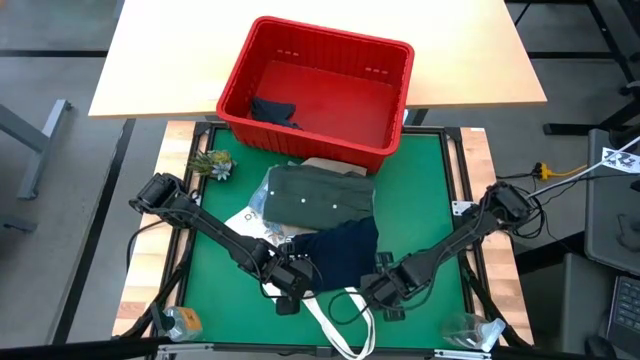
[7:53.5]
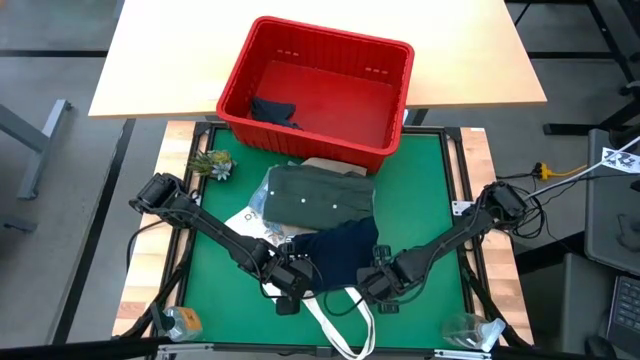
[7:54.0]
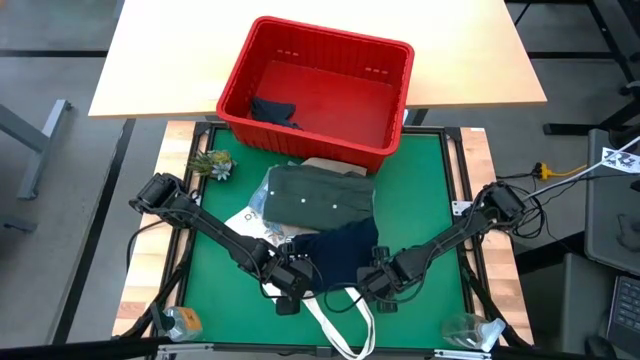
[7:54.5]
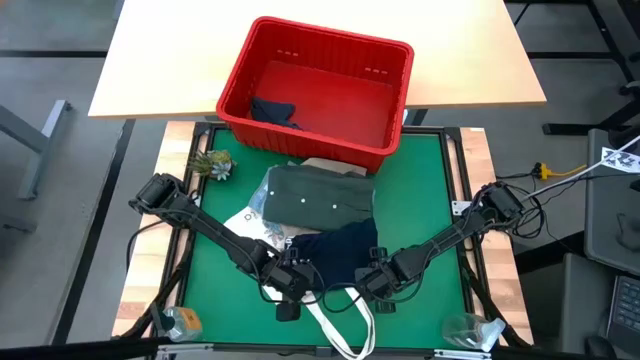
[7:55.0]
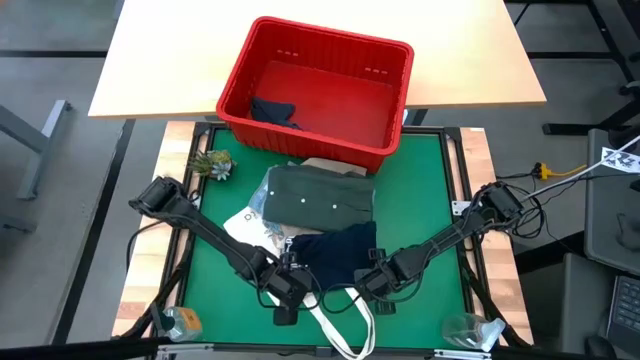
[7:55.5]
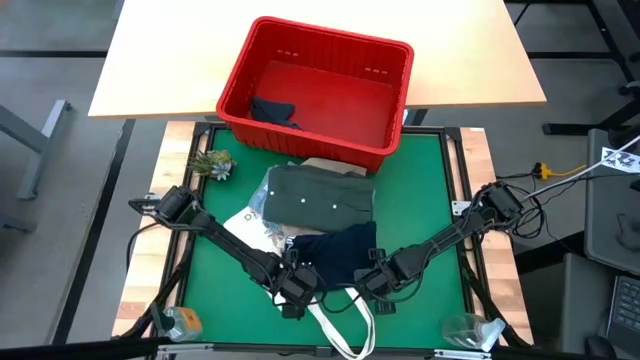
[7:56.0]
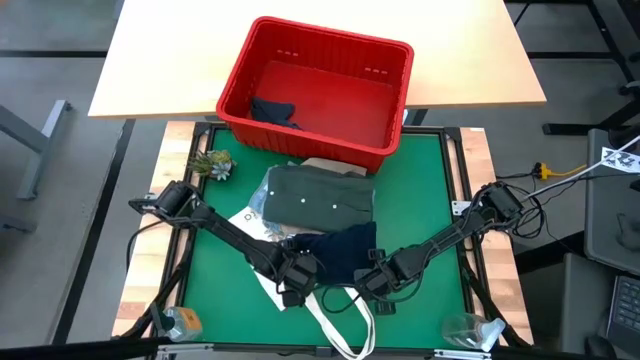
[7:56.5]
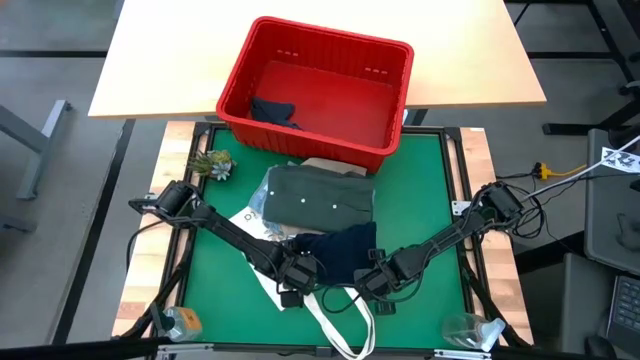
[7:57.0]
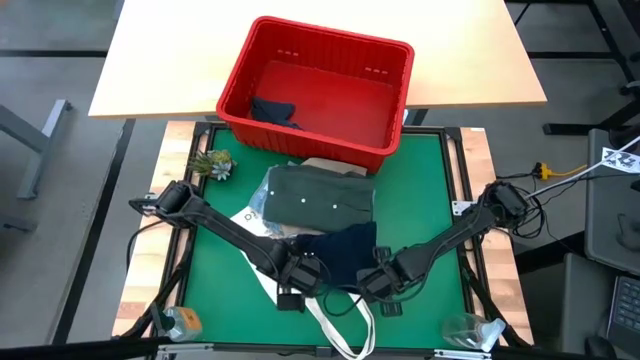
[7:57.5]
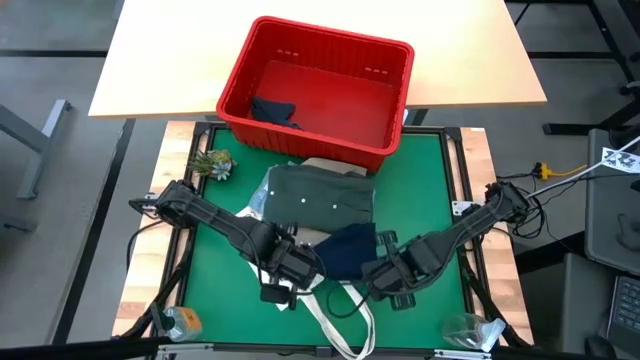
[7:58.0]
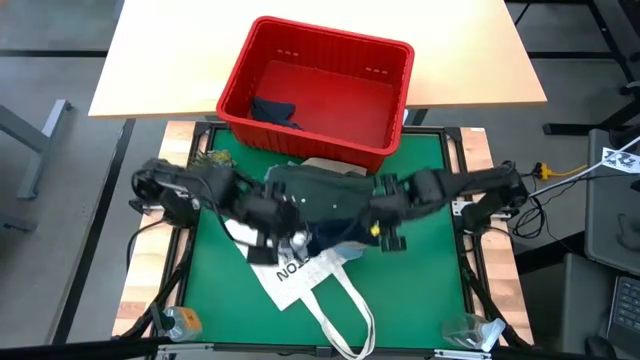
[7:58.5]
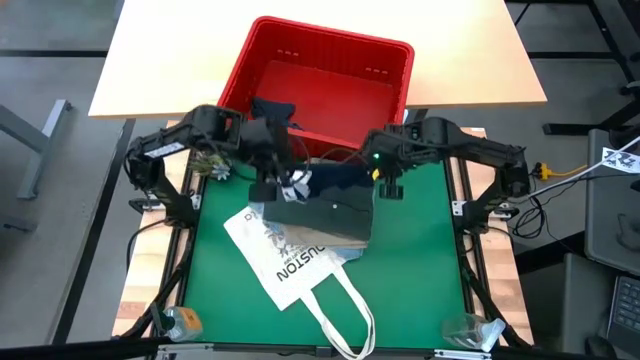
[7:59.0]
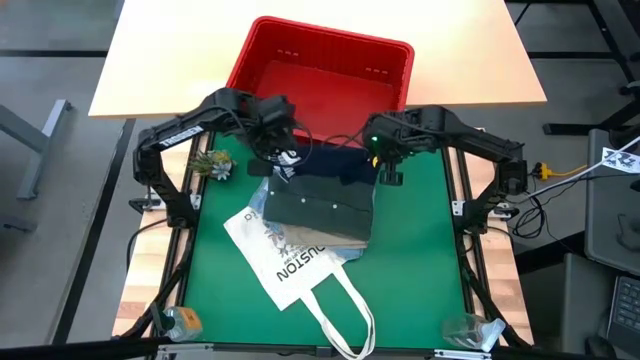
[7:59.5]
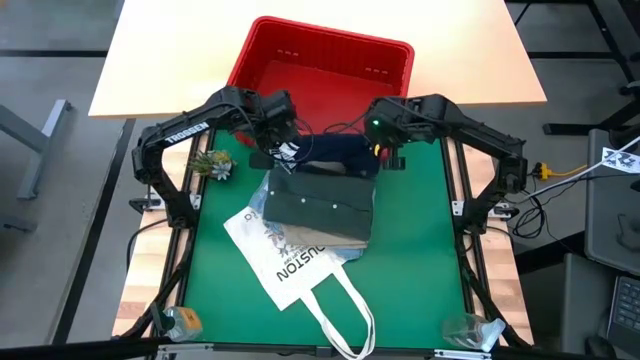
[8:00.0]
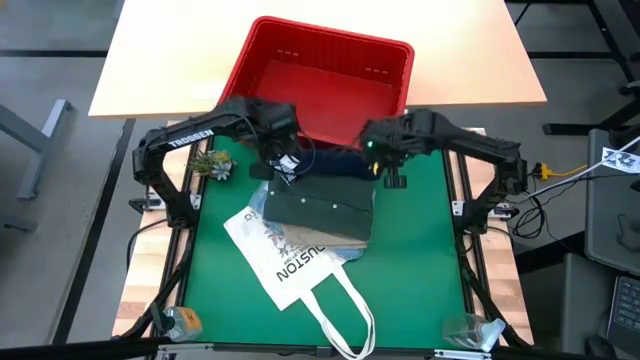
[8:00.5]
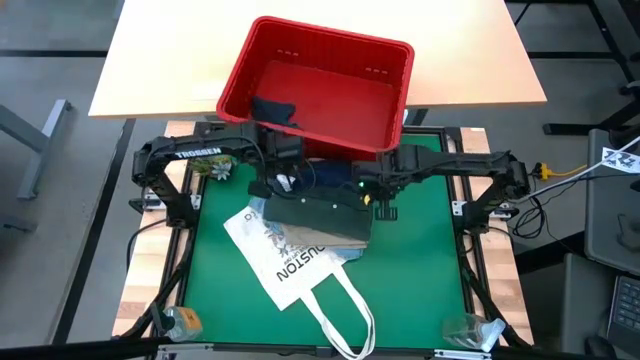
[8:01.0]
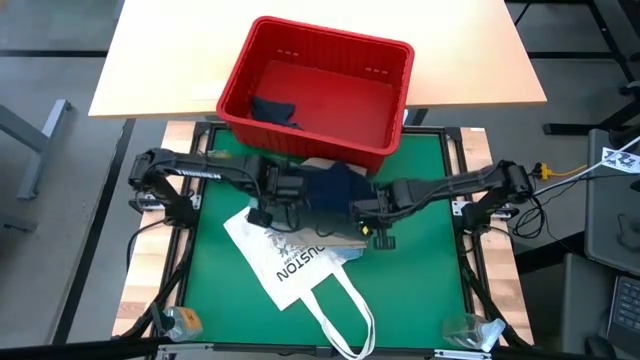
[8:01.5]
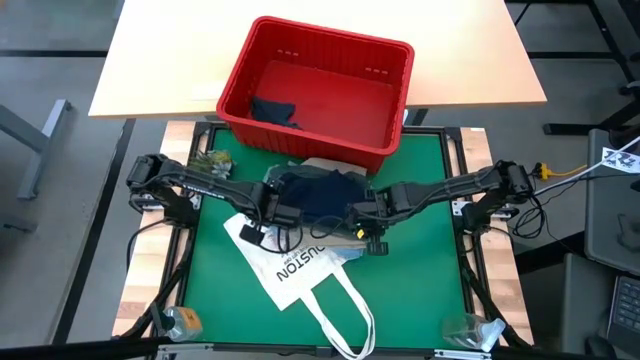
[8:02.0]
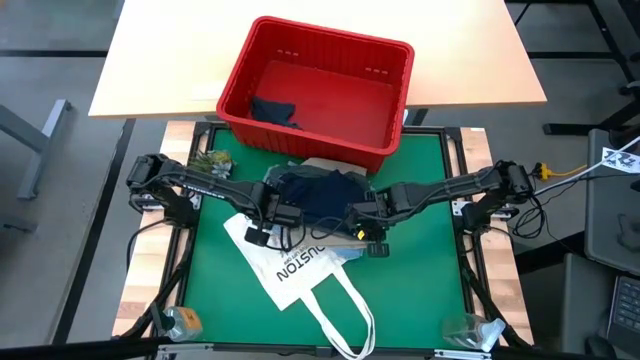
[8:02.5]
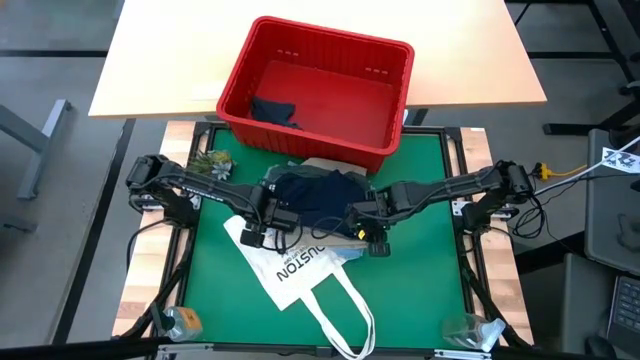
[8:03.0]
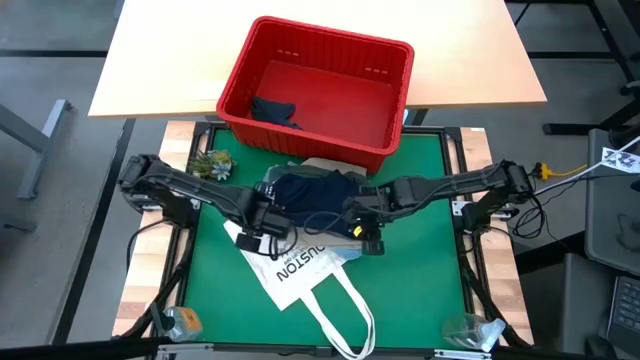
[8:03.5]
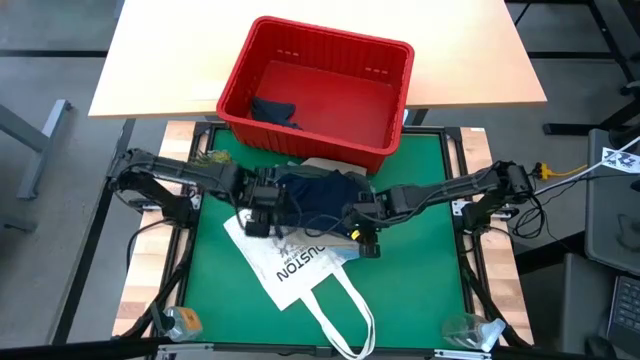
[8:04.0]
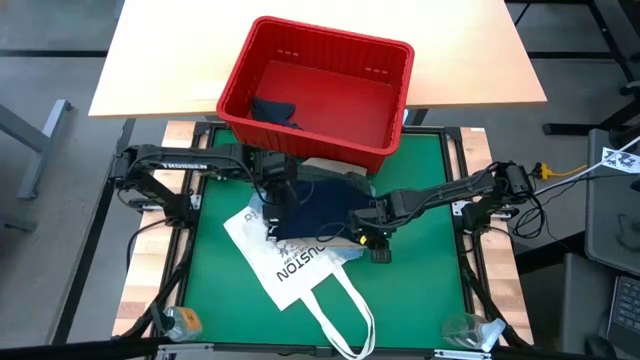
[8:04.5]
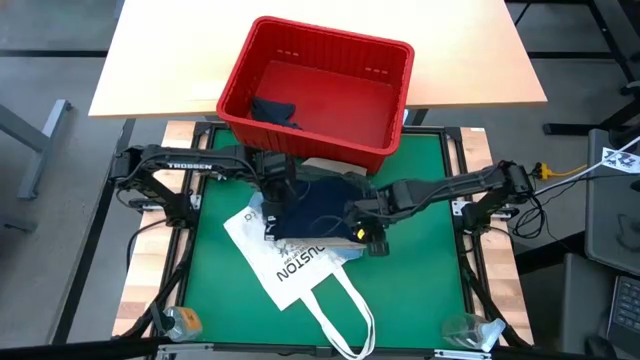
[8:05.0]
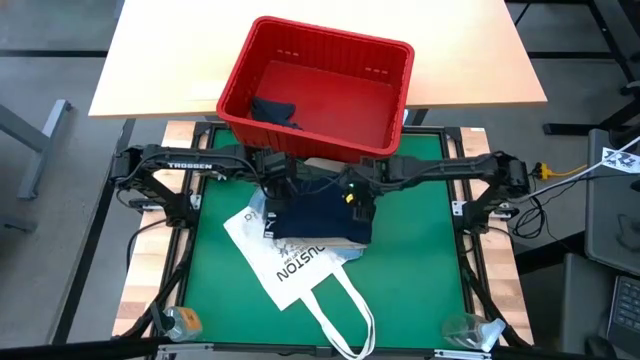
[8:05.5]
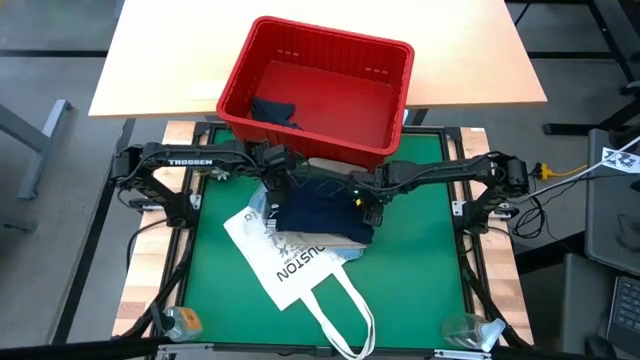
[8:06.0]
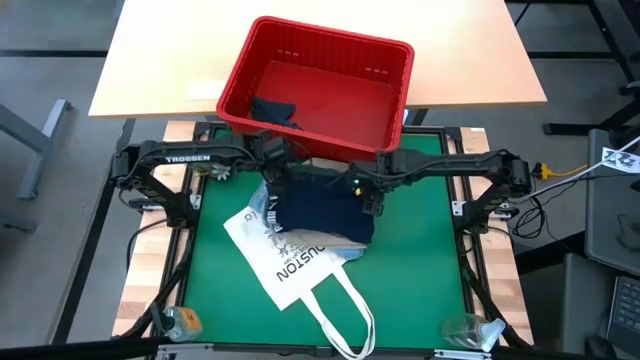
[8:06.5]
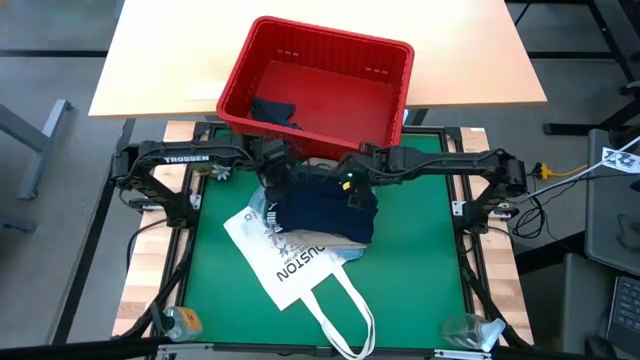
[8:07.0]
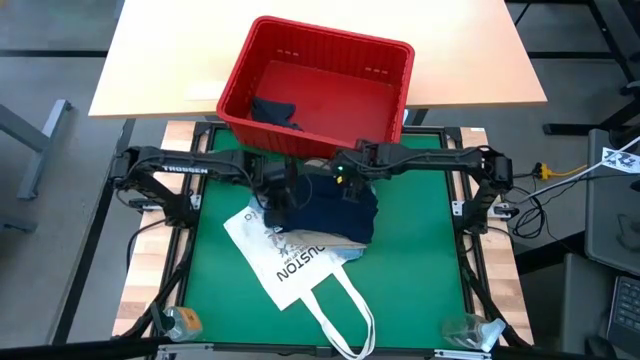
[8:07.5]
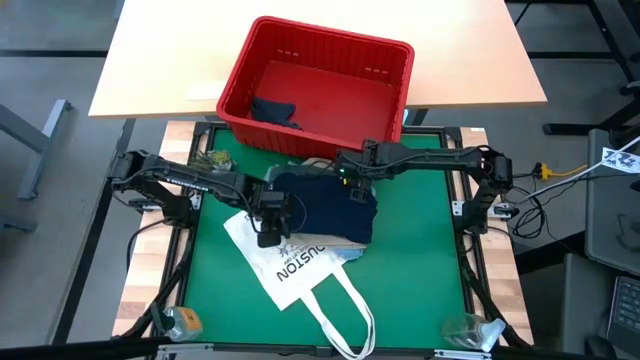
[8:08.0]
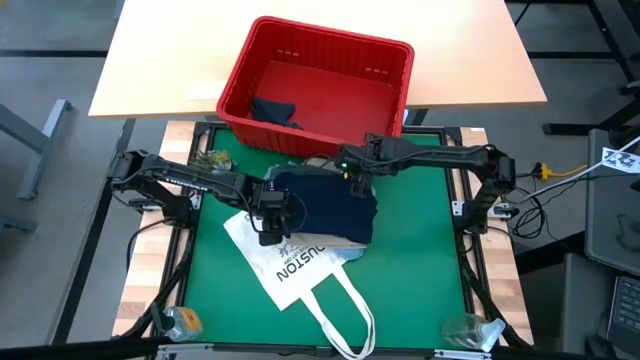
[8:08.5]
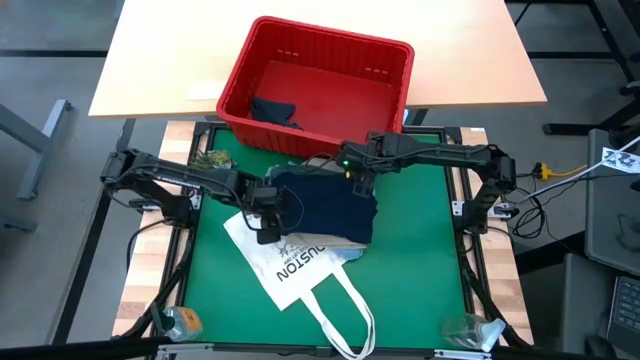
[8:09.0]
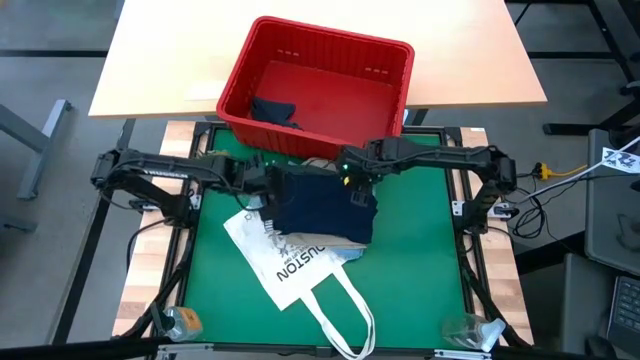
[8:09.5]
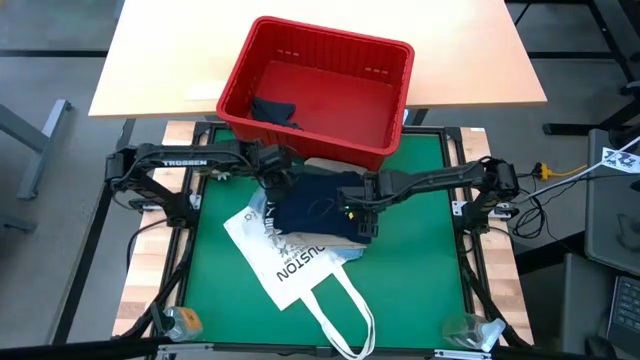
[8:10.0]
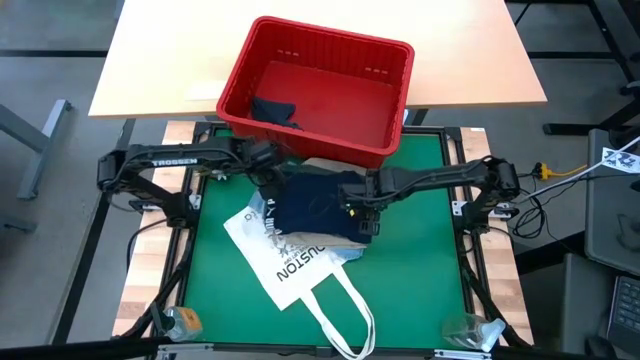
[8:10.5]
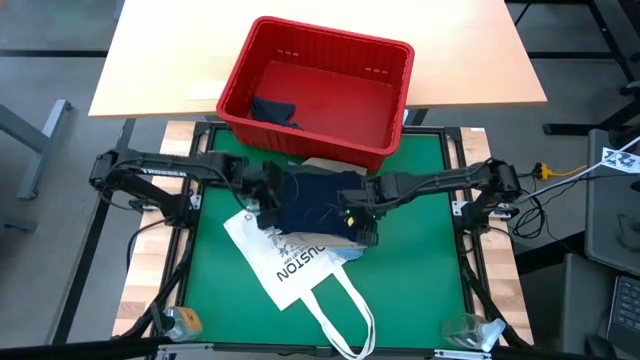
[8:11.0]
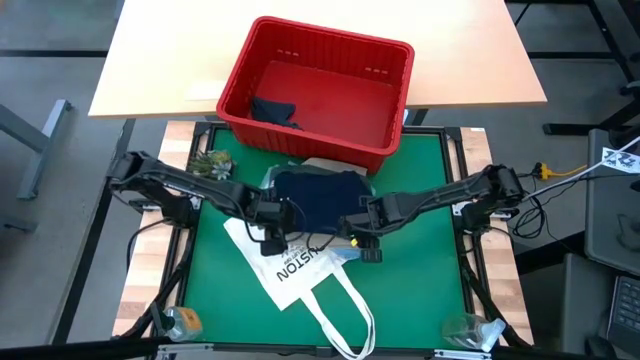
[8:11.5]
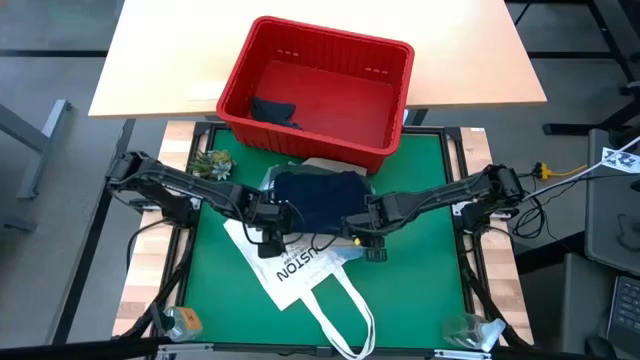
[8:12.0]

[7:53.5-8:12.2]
Task: Fold Laundry from Bin
Stack the dark blue boxers on top of the green shirt
